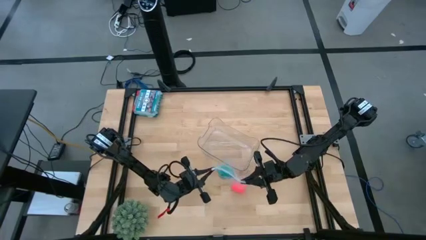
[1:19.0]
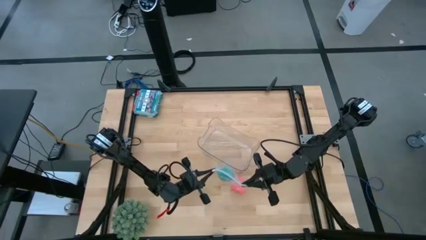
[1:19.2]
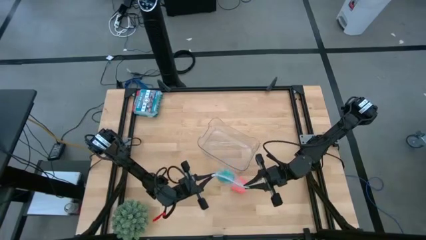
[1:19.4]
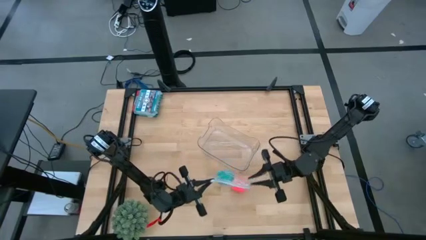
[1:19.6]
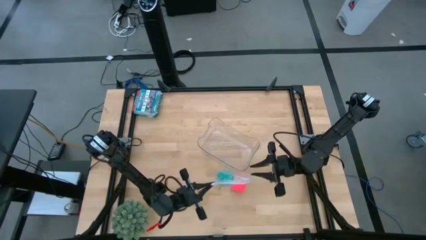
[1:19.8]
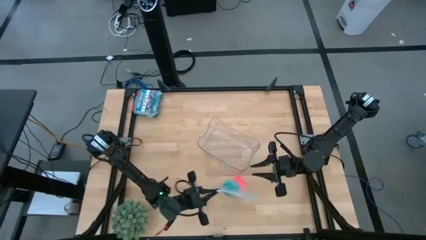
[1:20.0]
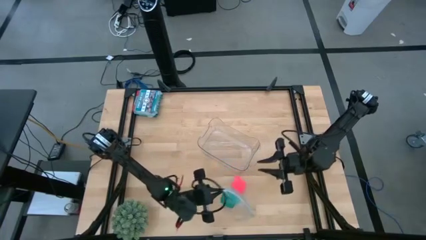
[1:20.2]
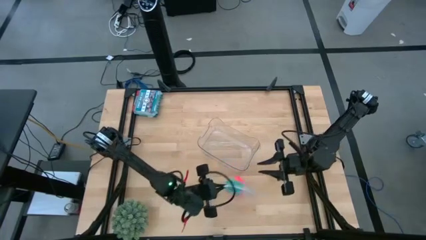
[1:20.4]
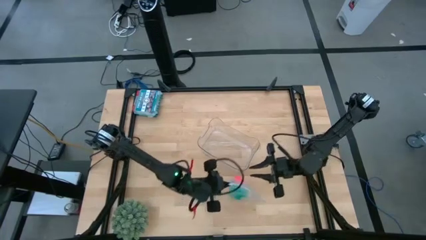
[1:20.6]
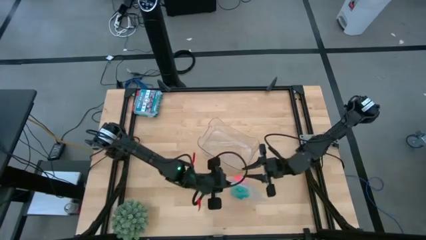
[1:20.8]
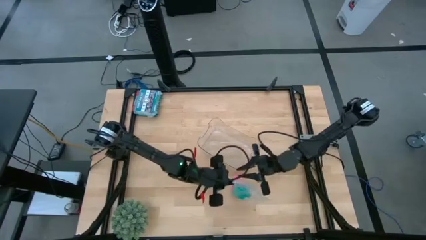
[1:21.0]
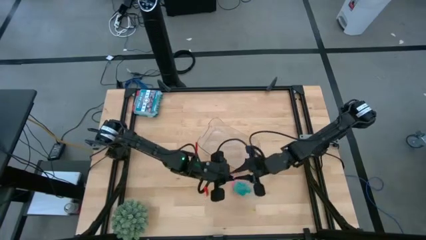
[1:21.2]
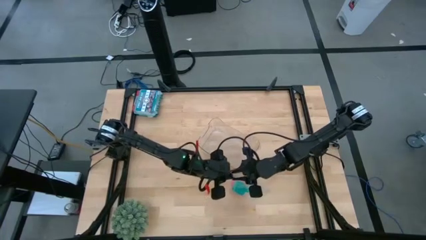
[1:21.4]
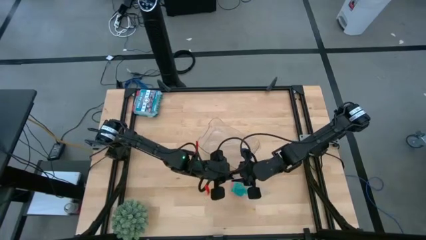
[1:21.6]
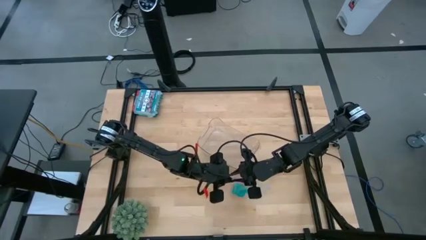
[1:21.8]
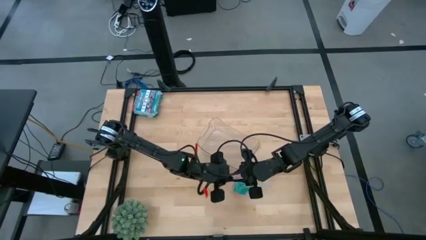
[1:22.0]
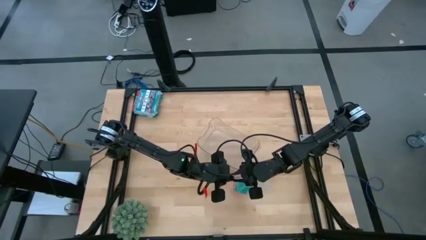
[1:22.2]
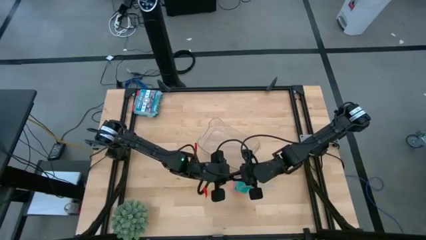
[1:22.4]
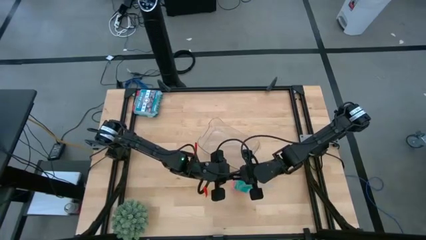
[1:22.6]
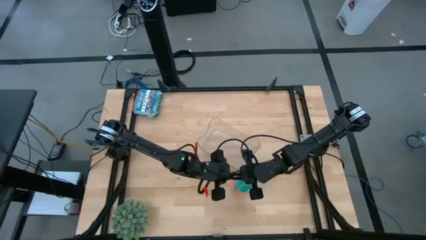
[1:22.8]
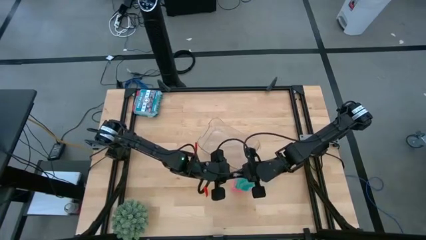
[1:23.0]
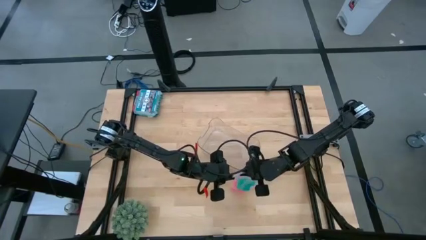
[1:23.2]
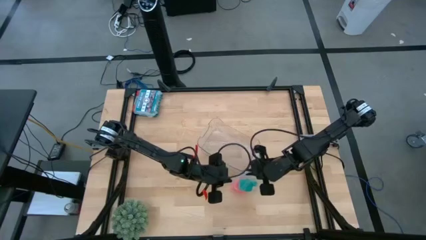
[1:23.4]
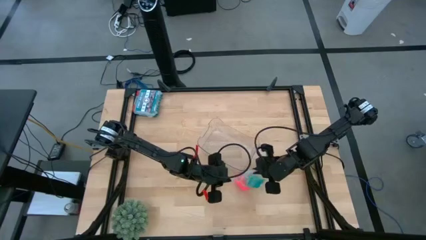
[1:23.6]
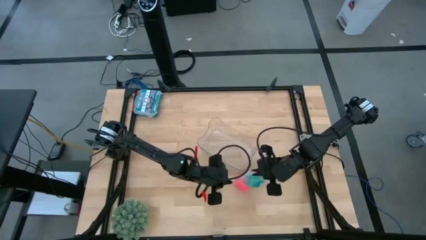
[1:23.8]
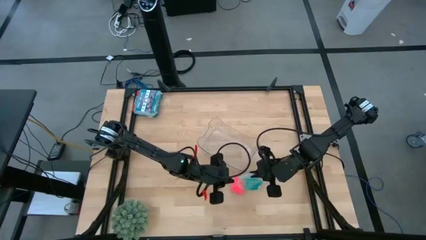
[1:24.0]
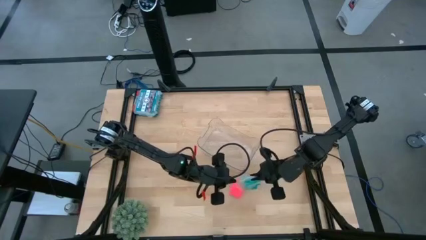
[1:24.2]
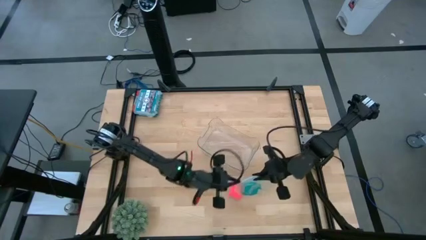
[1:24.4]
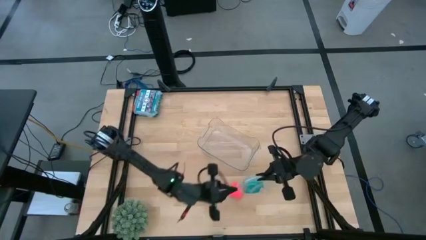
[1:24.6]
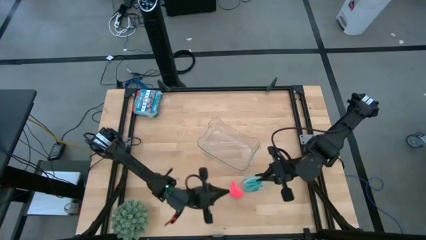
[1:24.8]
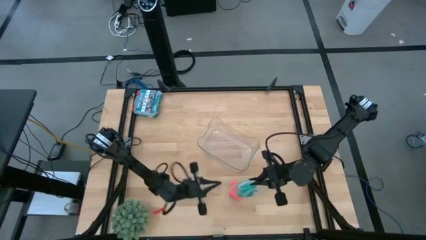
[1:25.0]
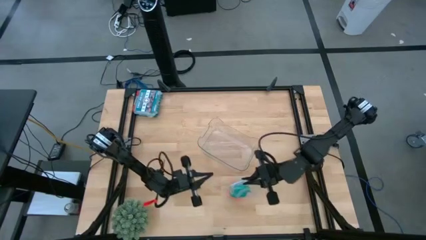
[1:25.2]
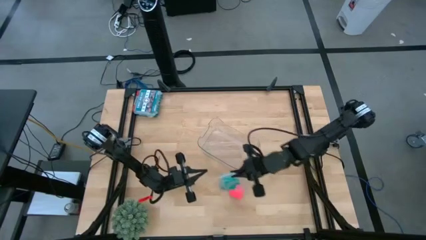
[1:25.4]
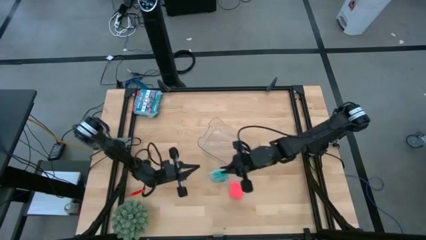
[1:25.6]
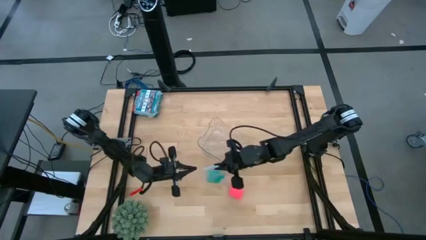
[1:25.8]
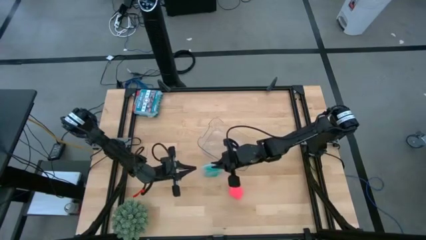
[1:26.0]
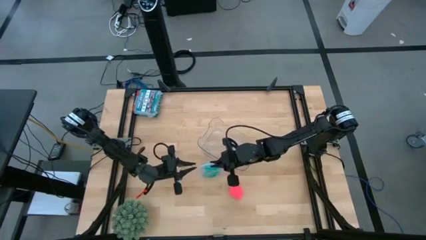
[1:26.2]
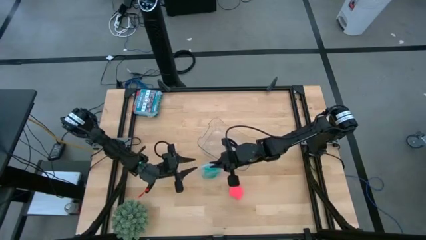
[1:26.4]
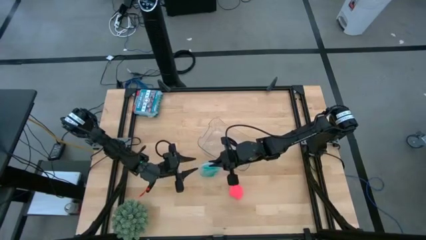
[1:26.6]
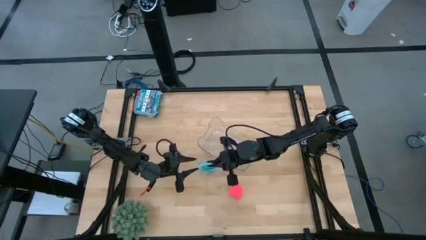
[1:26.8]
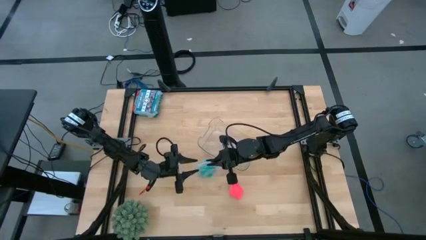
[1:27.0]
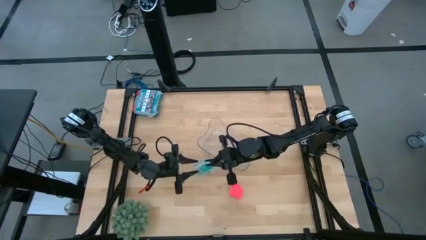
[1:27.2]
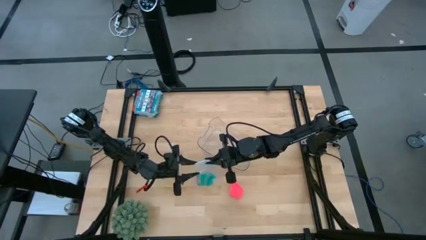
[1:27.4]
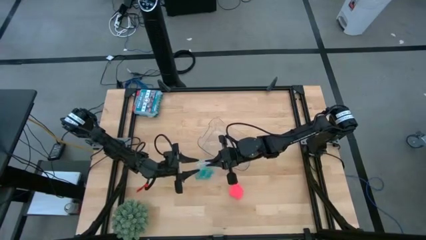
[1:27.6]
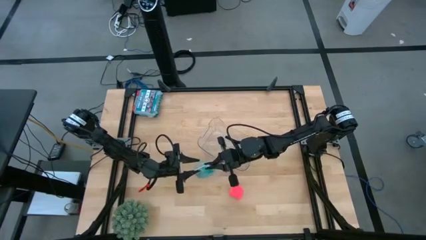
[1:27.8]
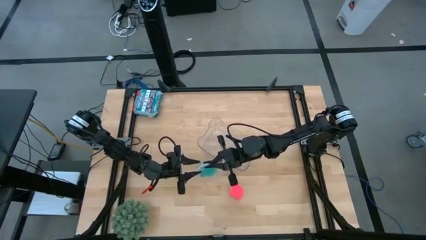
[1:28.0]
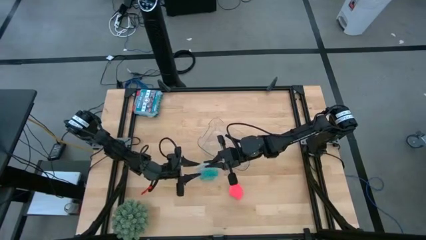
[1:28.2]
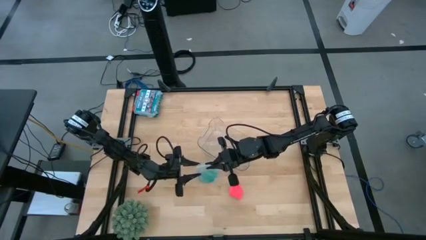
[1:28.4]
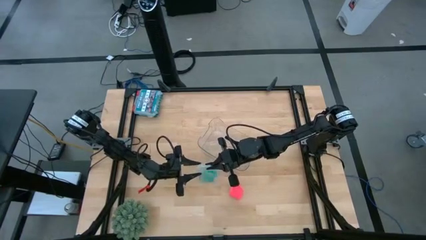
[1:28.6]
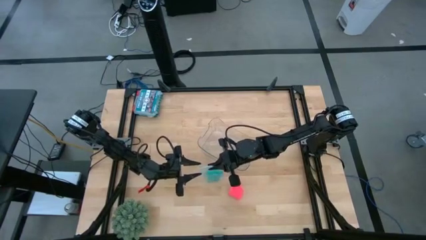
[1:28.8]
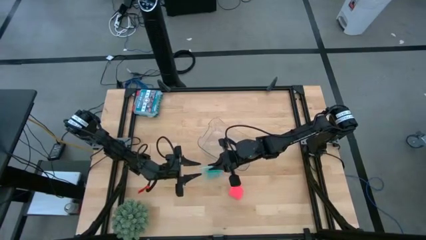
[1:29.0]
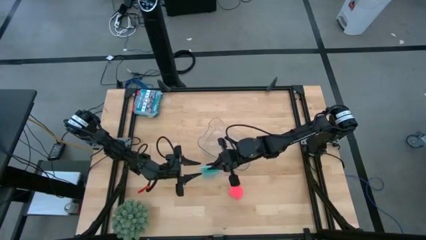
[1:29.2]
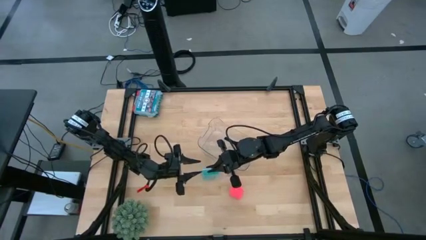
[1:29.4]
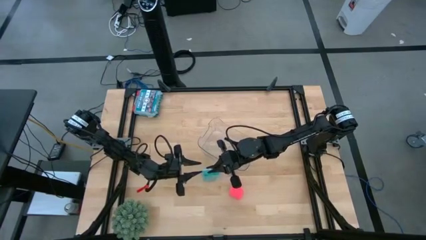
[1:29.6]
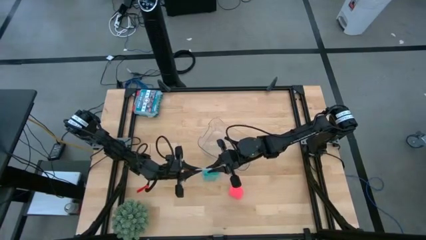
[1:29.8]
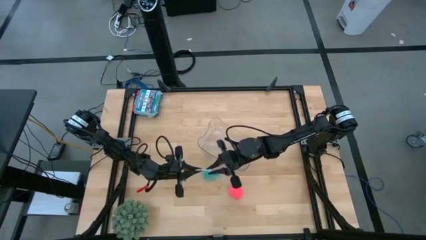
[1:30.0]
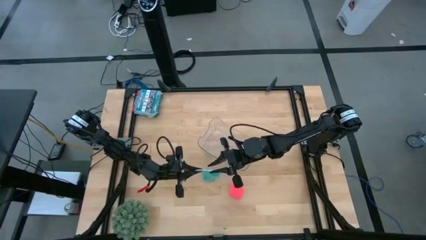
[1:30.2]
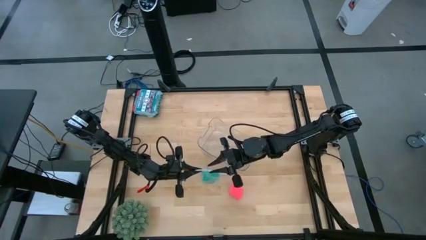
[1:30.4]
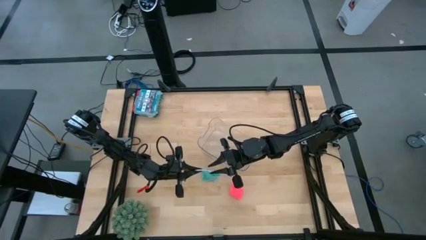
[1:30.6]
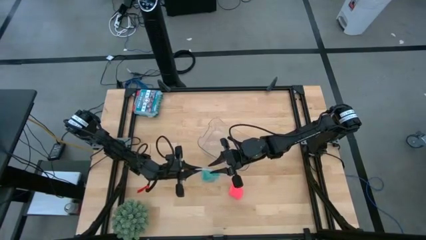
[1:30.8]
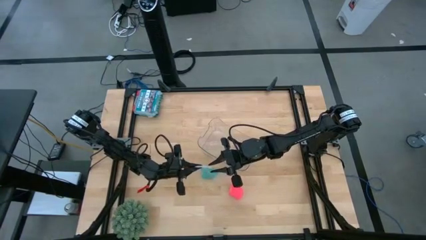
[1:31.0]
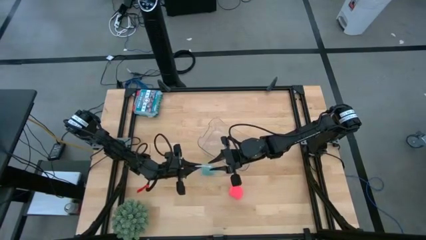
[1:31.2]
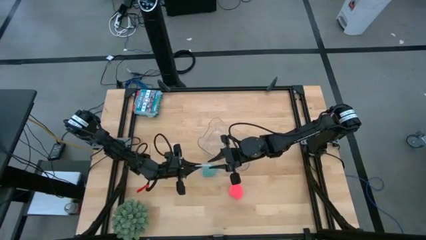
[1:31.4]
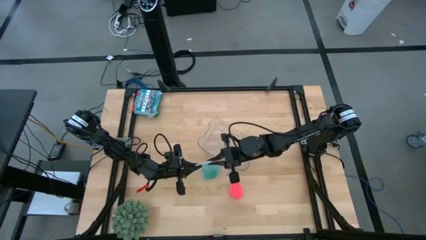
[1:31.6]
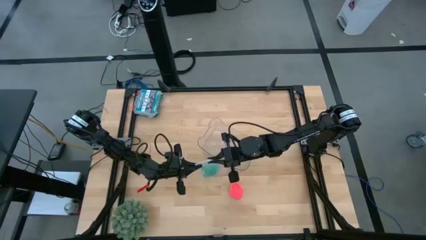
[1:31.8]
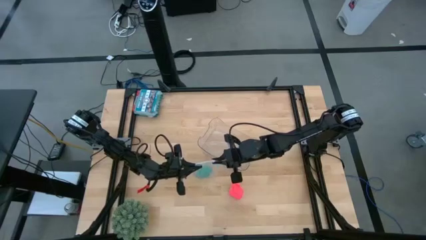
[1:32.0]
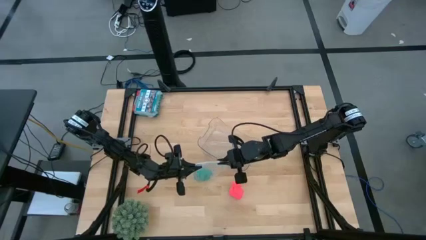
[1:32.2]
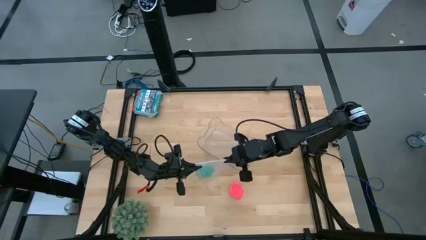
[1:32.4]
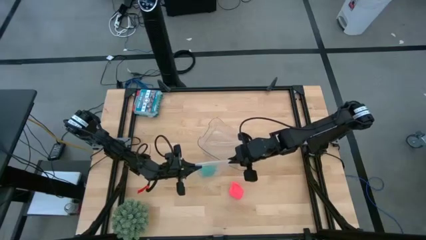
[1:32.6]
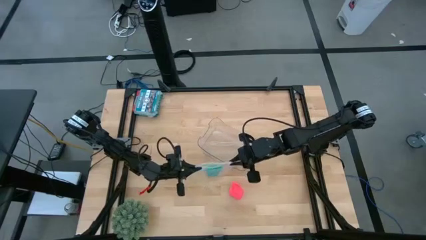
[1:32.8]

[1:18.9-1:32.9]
Task: Roll bandage
Open the transparent zip bag

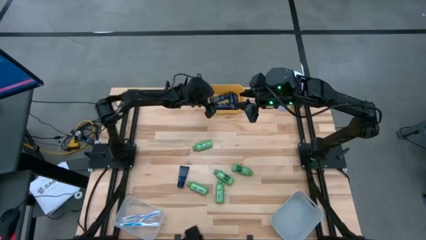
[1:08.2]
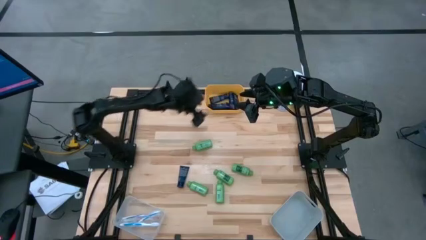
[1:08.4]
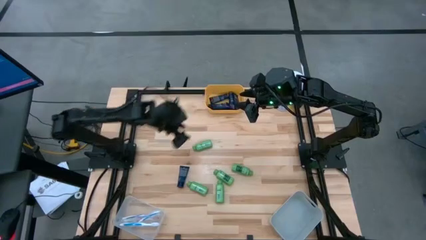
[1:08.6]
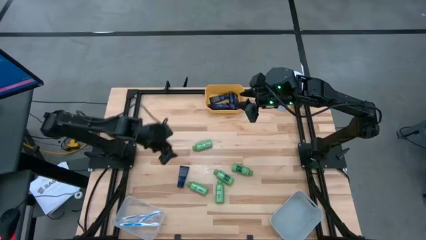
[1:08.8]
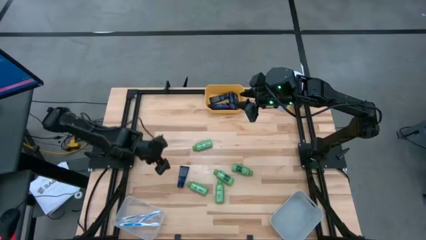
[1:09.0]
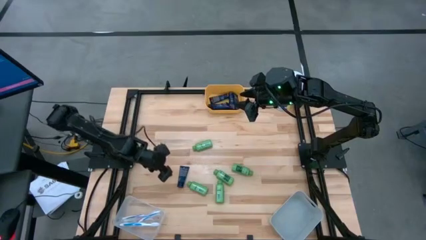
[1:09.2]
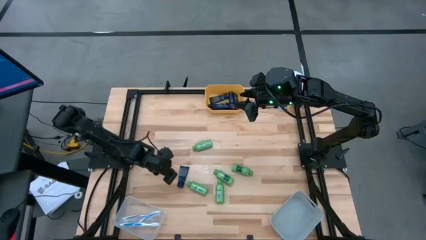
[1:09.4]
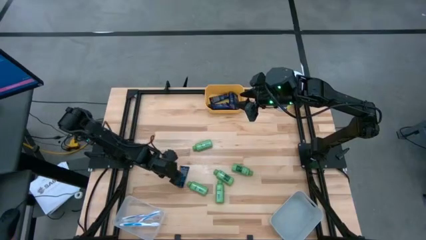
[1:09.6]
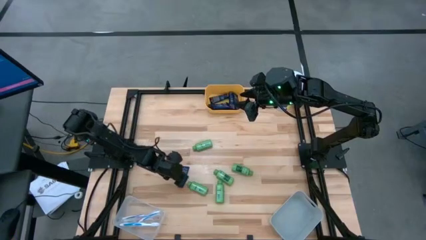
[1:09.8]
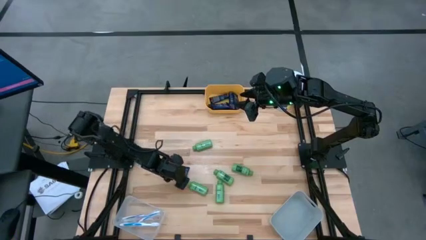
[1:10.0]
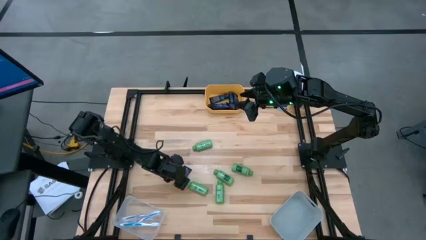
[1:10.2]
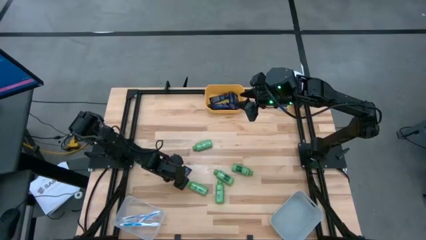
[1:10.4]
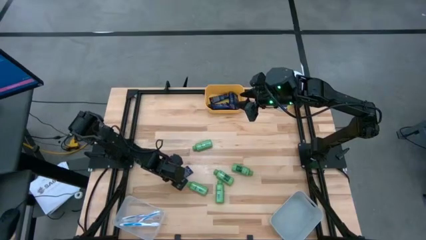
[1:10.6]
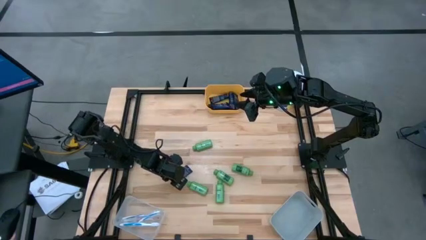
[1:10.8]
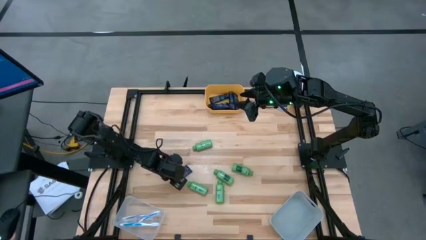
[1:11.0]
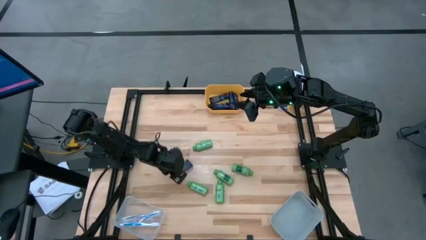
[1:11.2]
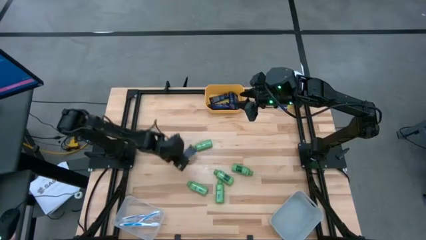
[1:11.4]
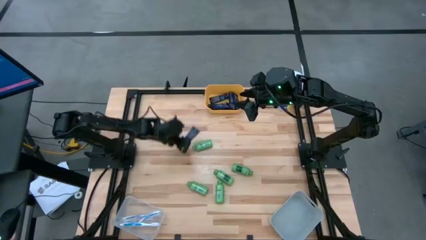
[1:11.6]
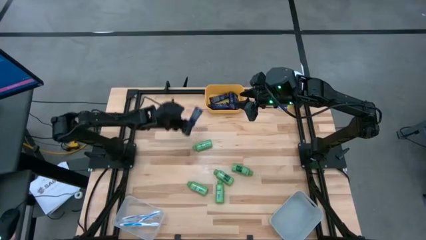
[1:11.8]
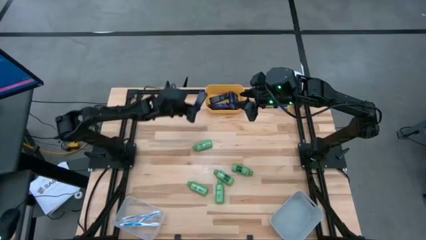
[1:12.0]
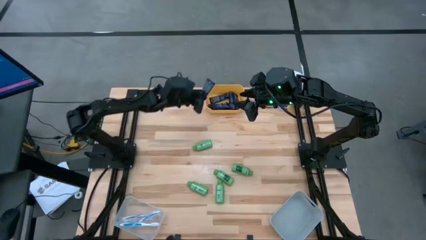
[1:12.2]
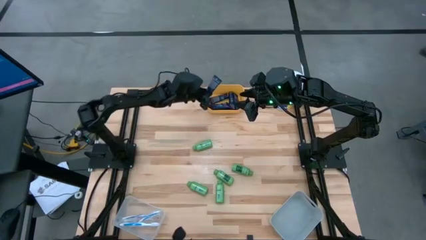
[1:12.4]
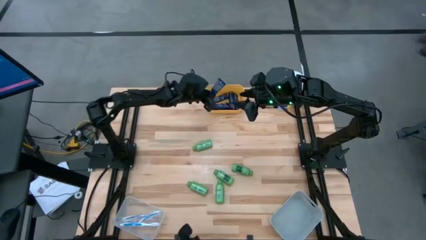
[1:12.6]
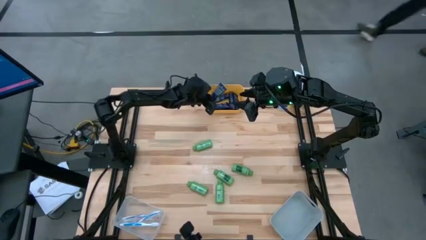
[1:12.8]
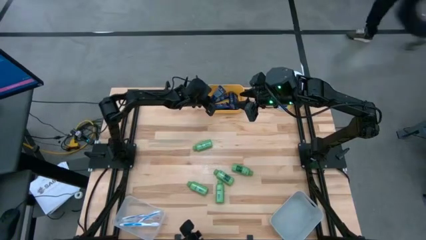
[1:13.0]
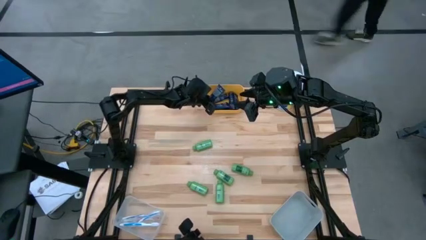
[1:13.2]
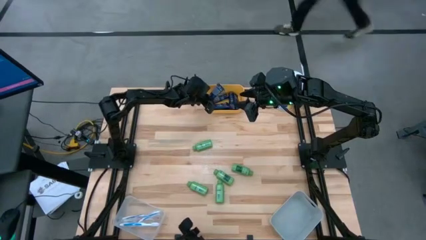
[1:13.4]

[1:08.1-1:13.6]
Task: Pick & Place Travel size toiletries
Put the shave cream into the yellow bin
